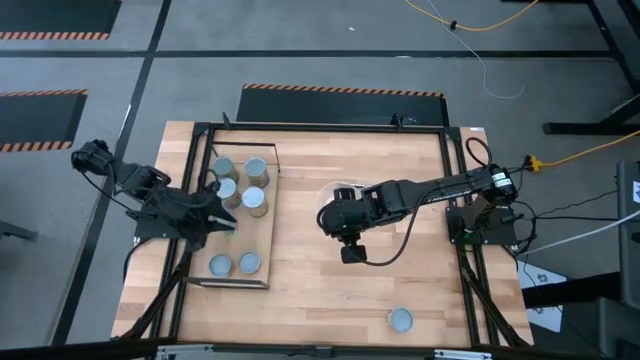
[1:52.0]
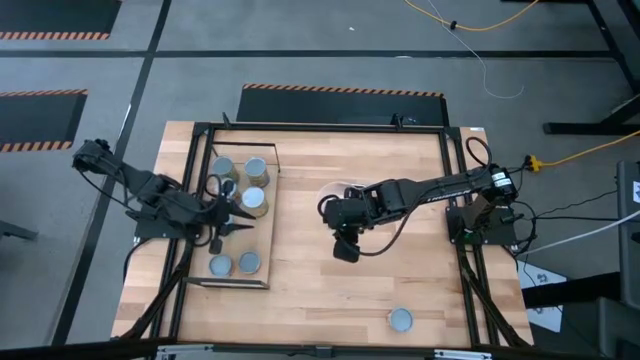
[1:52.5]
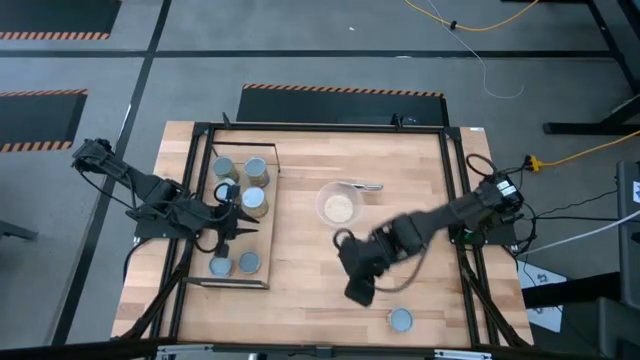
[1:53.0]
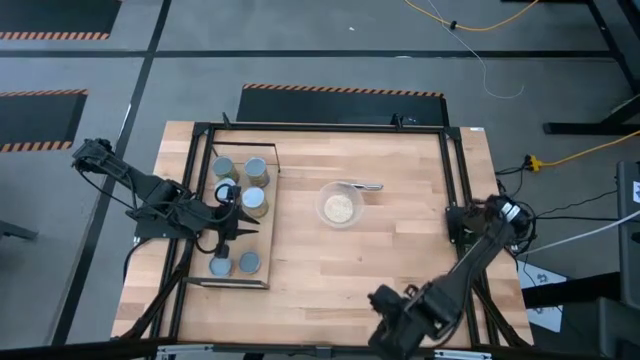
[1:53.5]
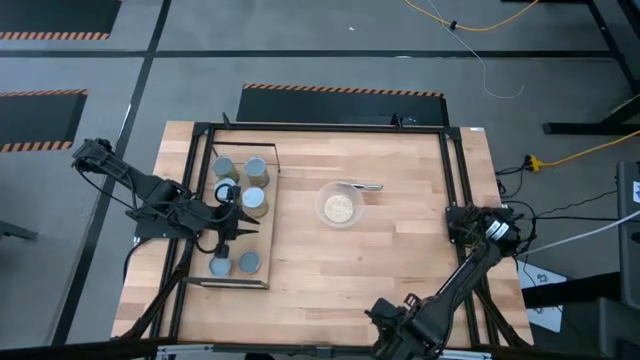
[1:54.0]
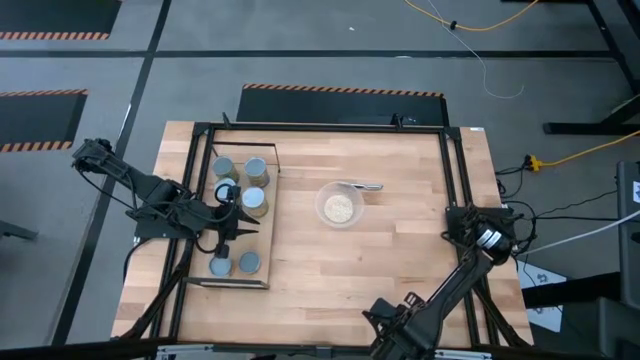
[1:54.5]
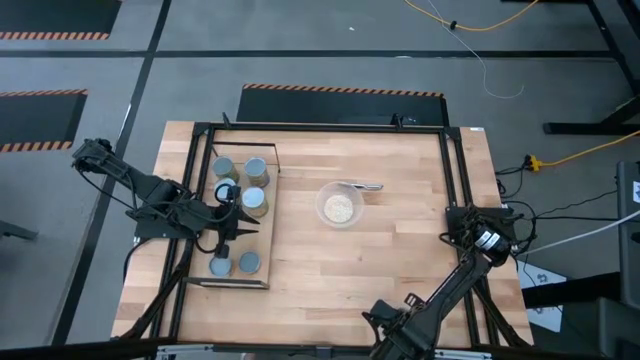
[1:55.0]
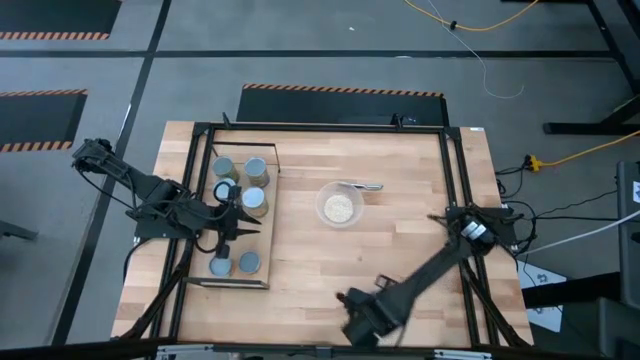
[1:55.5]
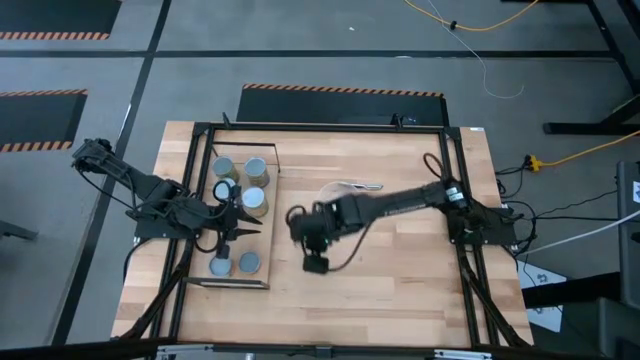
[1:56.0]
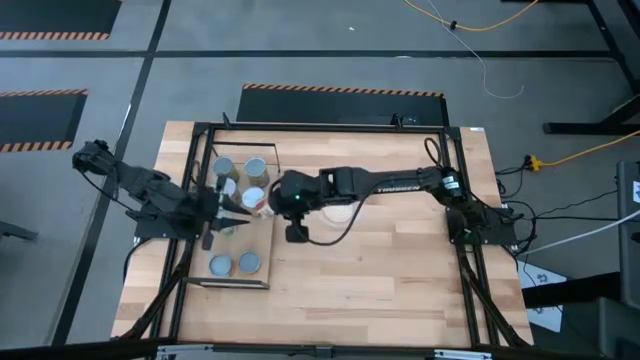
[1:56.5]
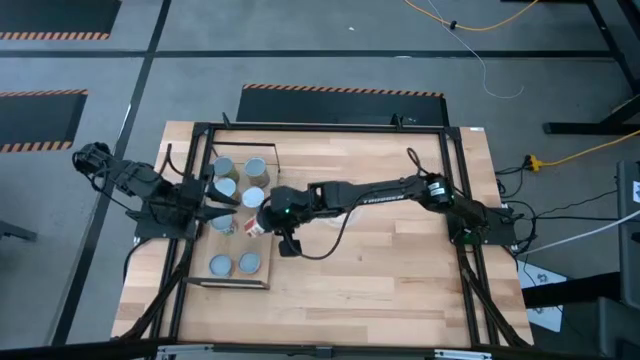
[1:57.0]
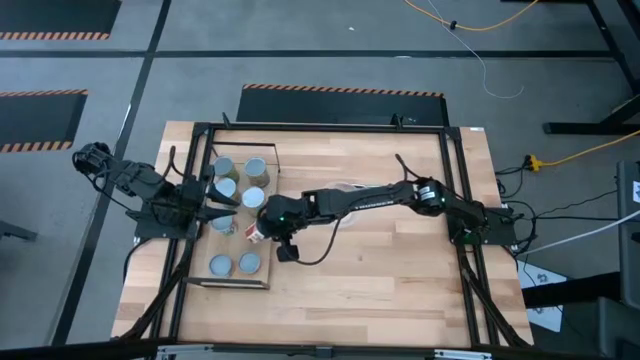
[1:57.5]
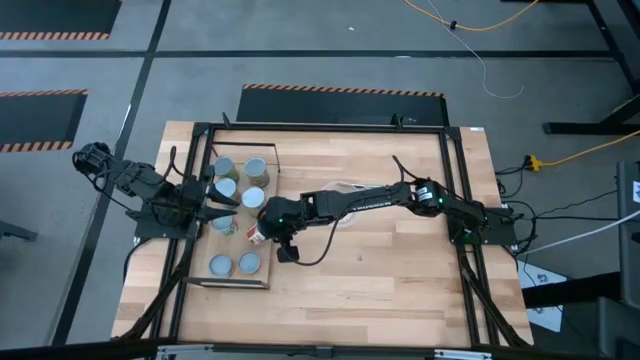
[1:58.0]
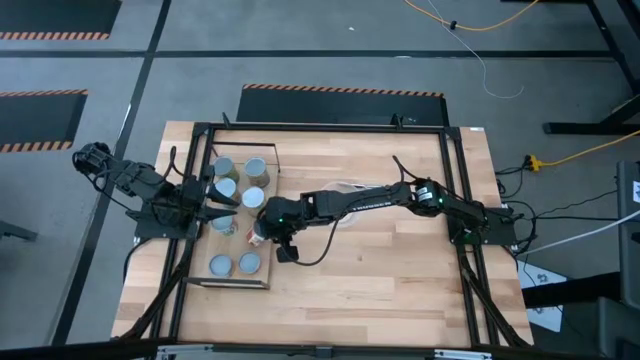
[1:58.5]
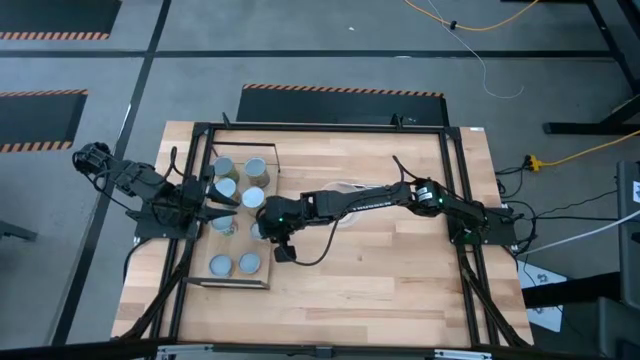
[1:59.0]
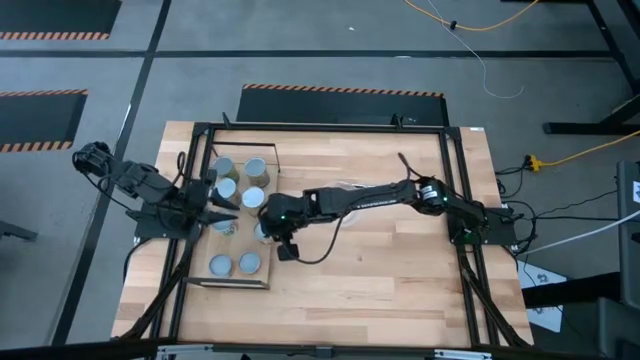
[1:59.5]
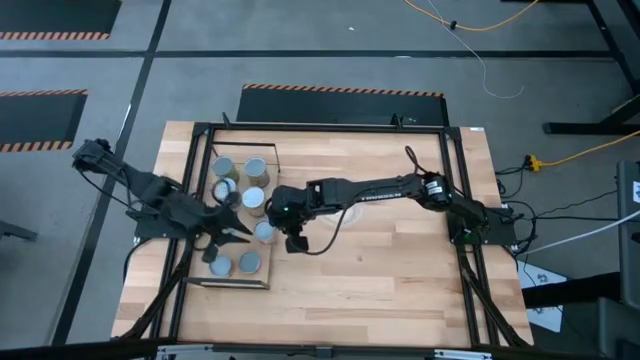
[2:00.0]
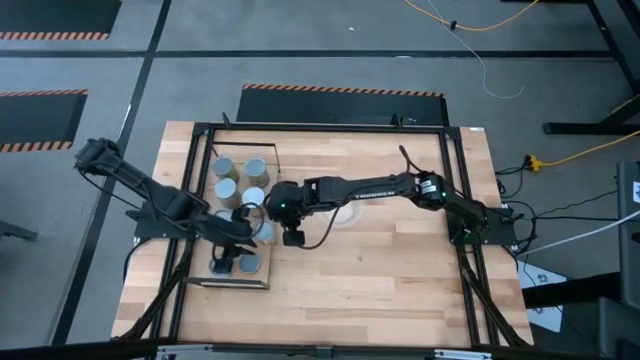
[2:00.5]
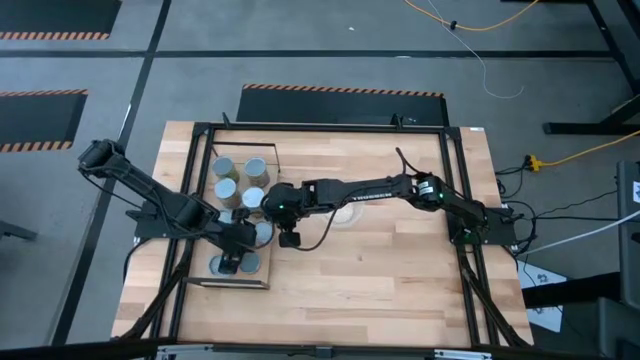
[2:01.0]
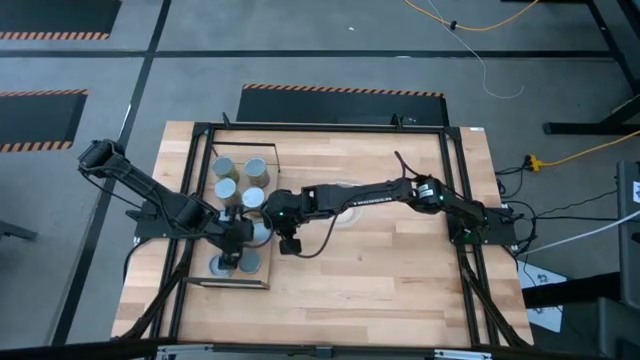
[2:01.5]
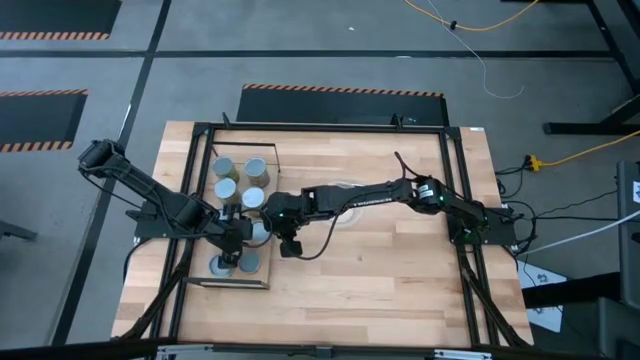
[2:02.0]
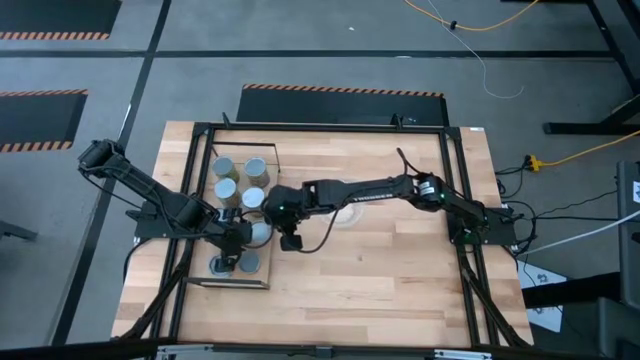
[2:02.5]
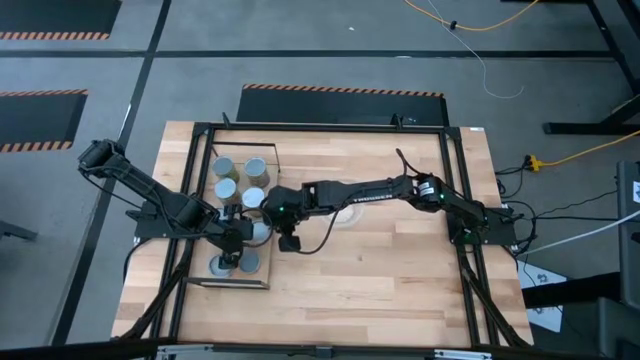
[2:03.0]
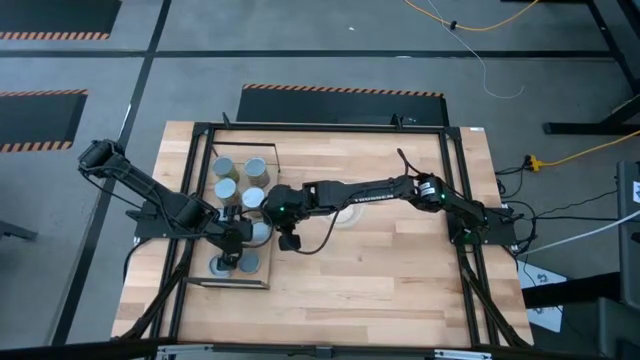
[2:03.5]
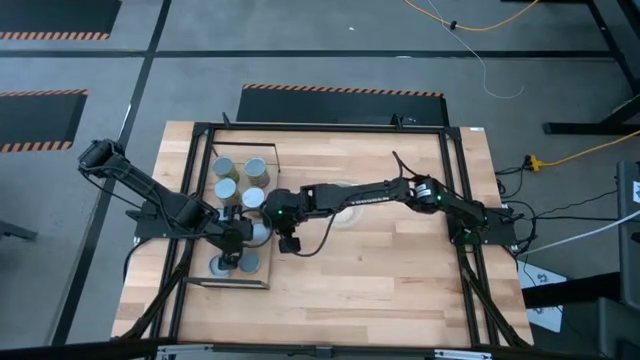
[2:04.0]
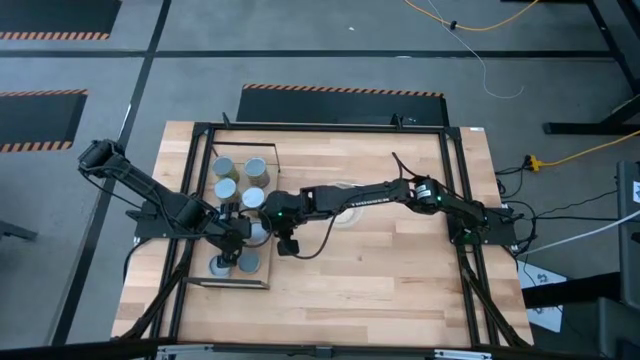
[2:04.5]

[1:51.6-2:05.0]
Task: Pick and place cans onto a shelf
Put the canned diced tomatoes on the shelf

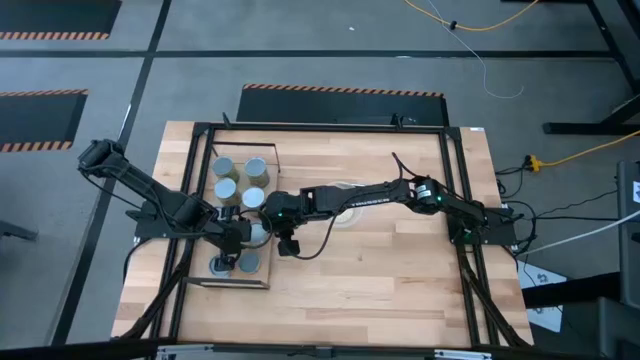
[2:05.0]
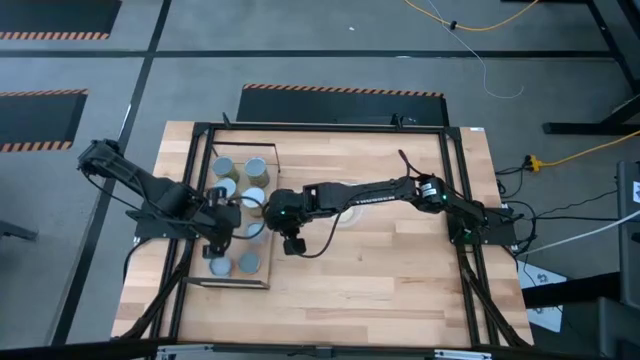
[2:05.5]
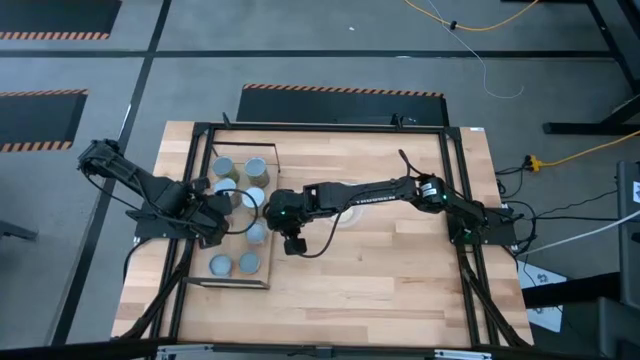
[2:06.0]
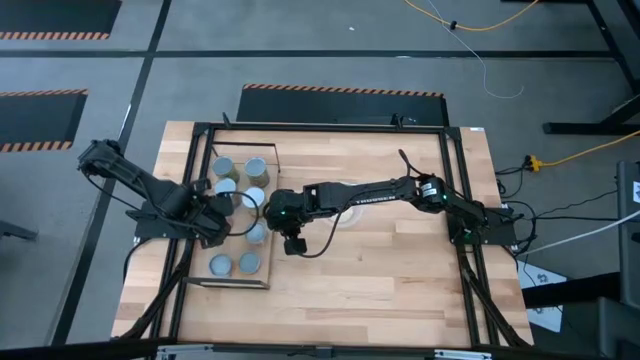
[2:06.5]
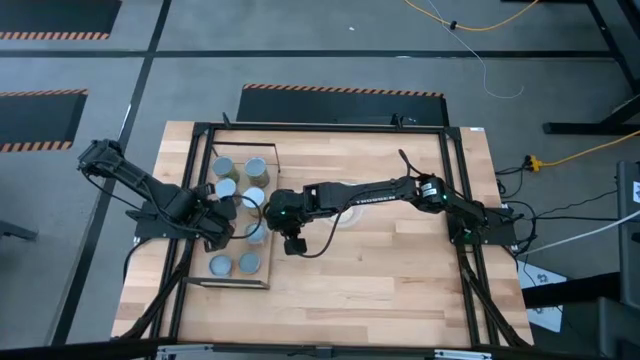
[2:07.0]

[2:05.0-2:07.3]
Adjust the canned apple on the shelf

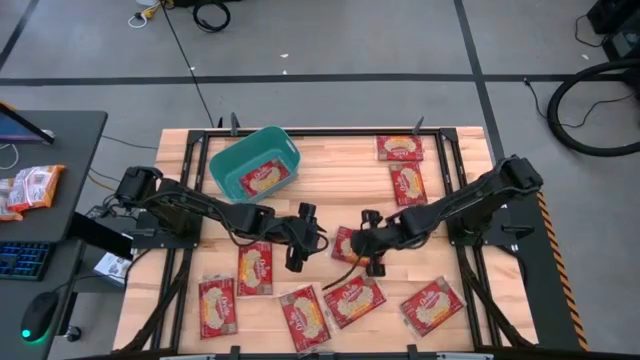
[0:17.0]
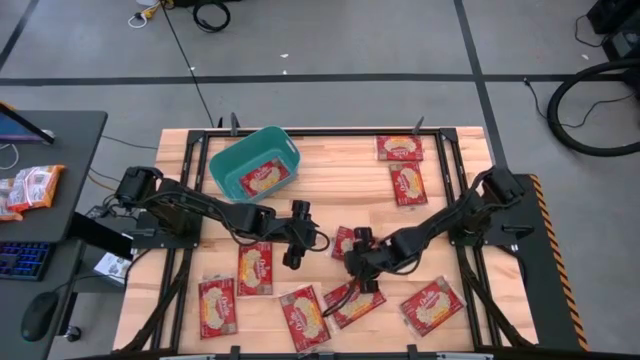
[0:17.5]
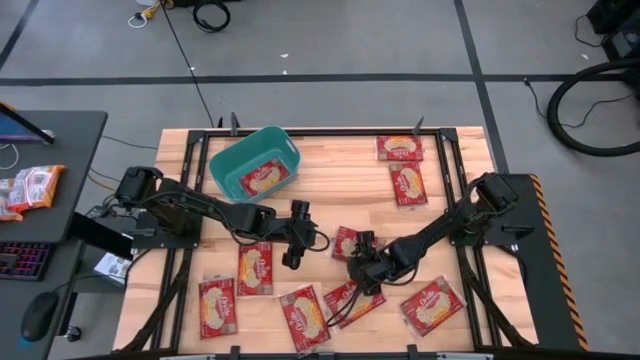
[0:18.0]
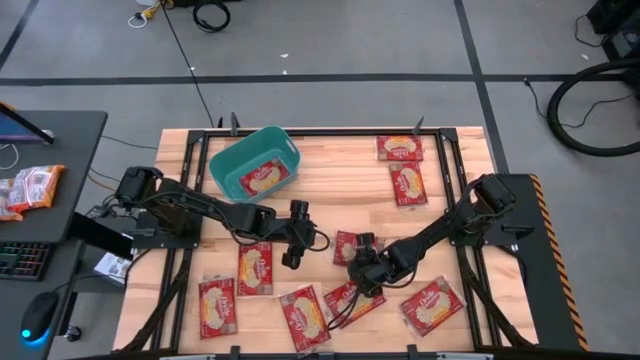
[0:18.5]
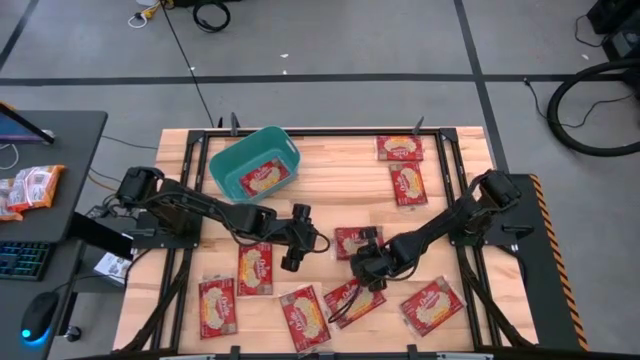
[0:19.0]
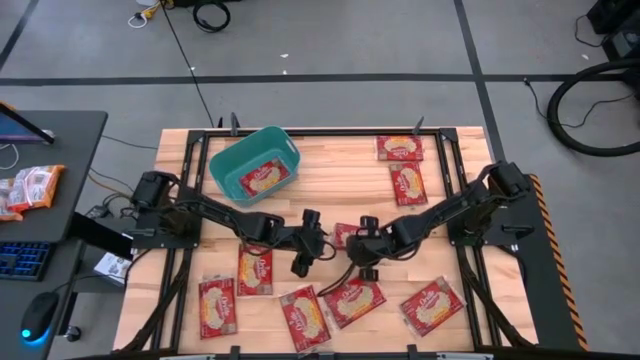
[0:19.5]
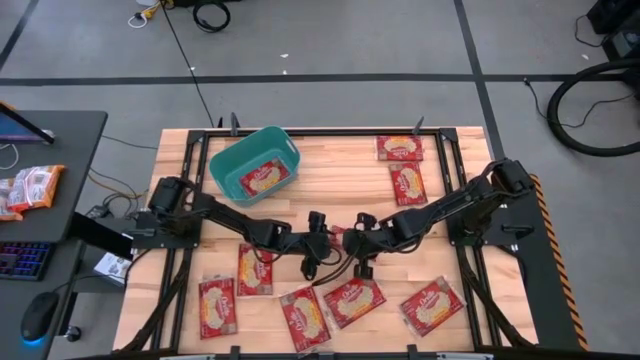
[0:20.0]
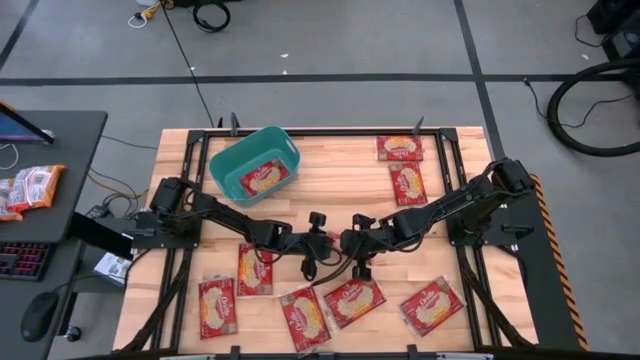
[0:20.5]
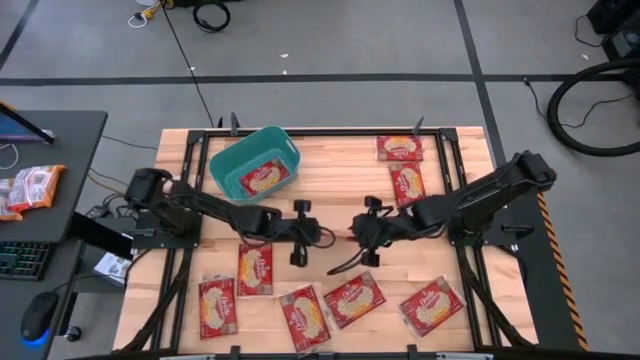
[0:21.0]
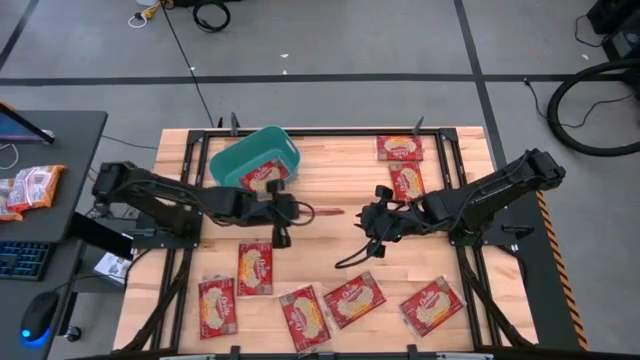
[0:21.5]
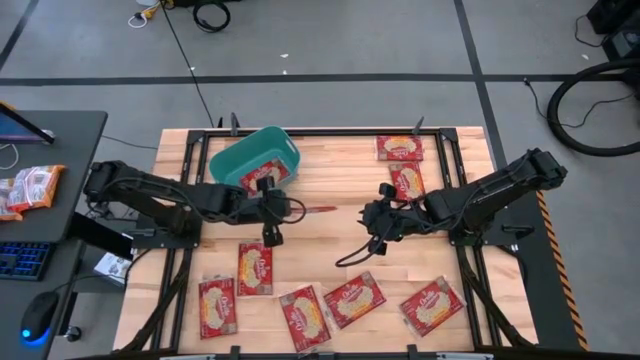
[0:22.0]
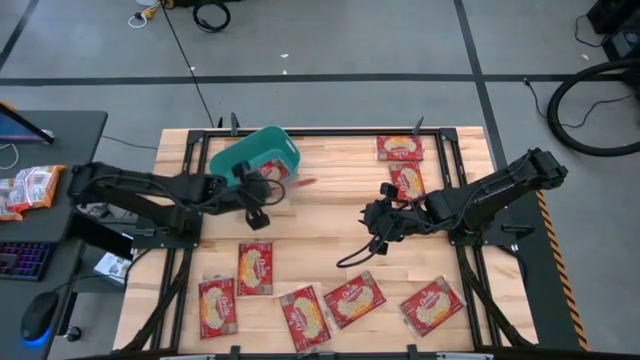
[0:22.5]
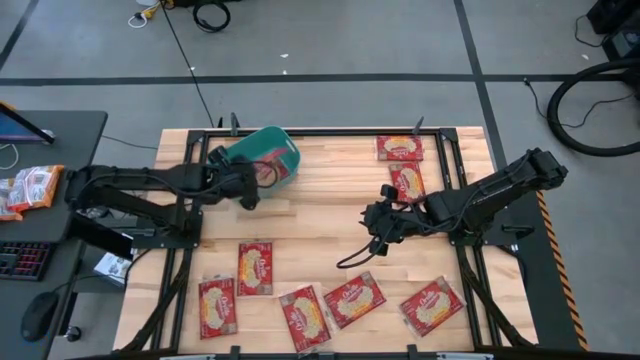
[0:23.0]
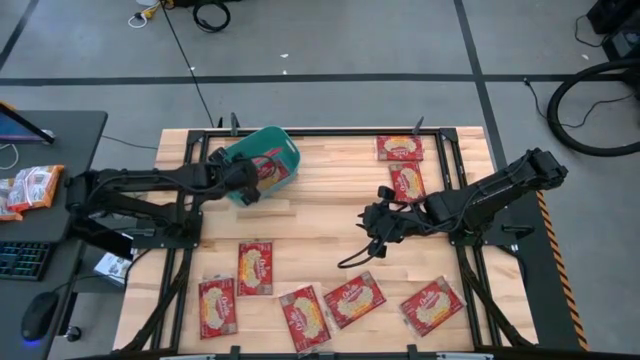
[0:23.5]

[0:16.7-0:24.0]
Task: Sort popcorn bags into baskets
Put the popcorn bag into the bin
